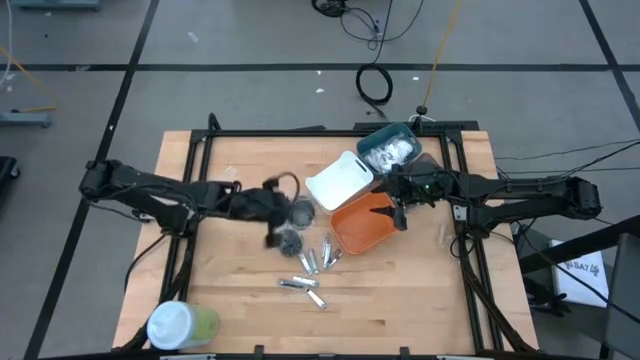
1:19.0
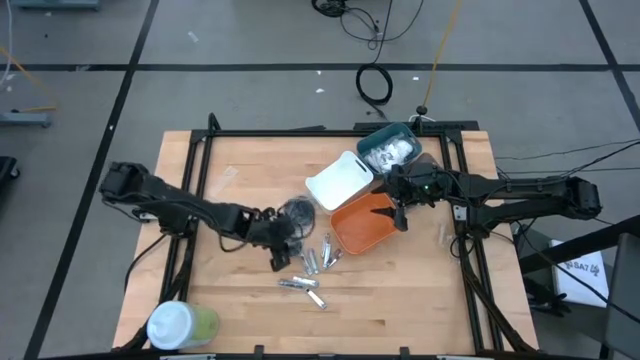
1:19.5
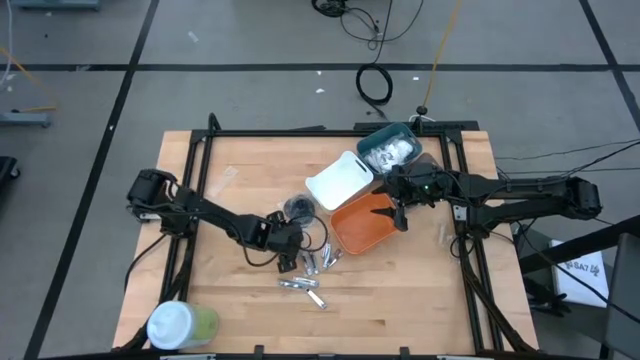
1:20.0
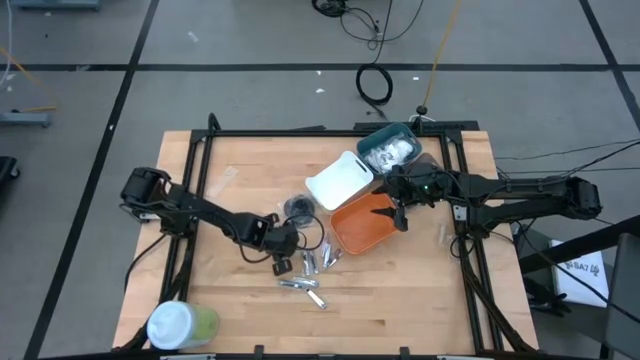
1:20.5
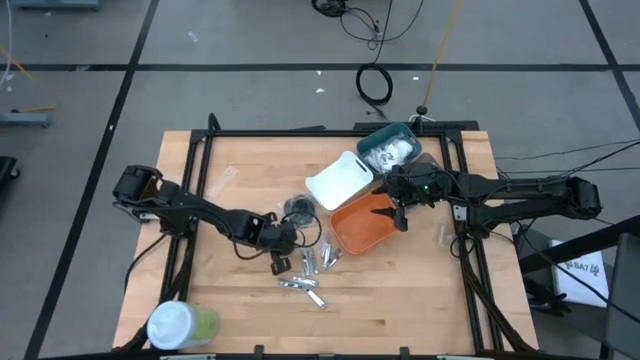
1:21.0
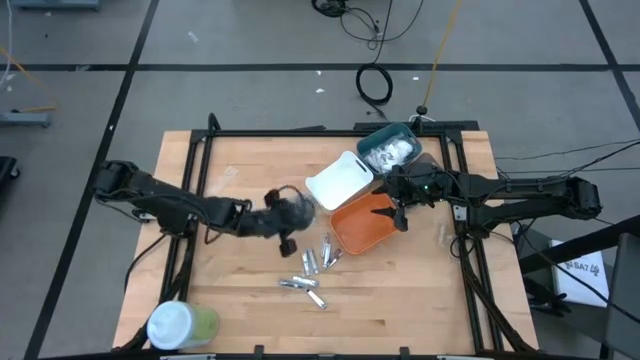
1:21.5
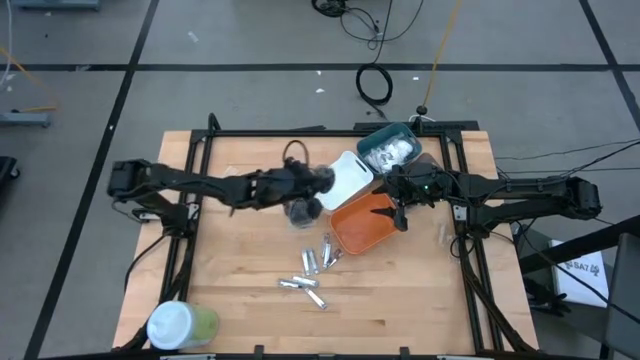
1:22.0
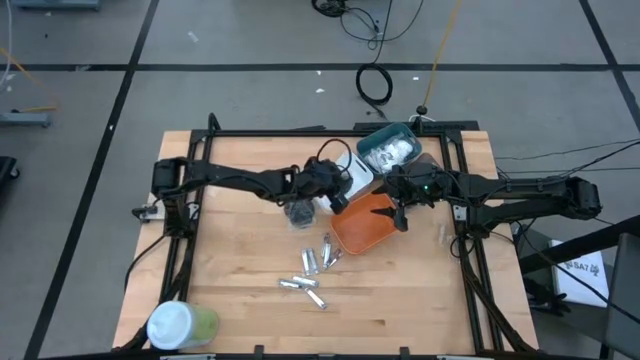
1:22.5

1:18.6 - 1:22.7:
Task: Pick & Place Travel size toiletries
Put the black hairbrush into the white bin

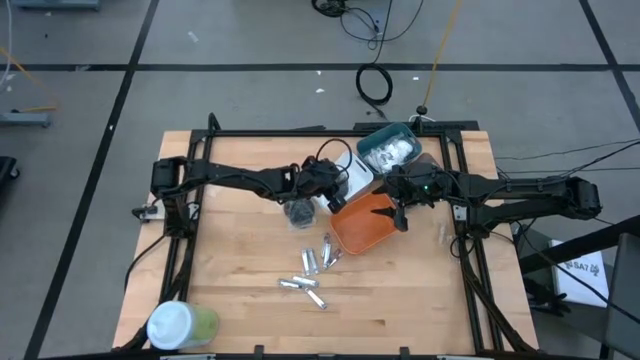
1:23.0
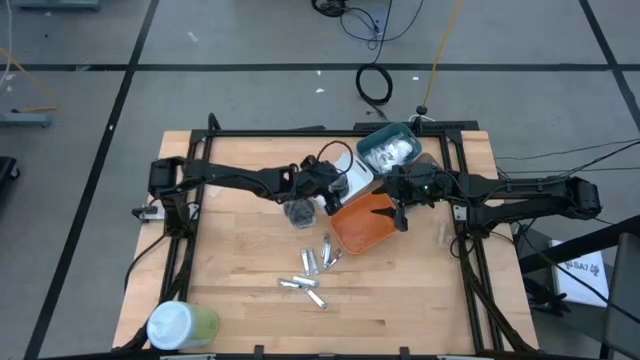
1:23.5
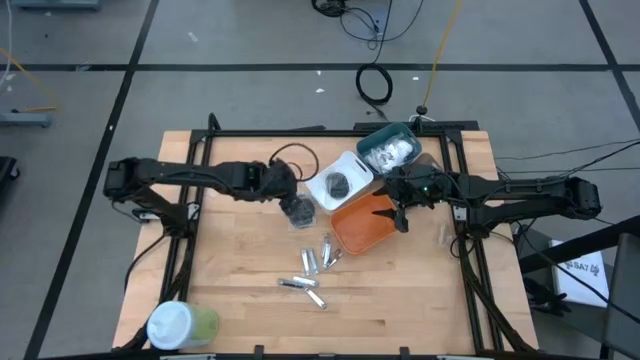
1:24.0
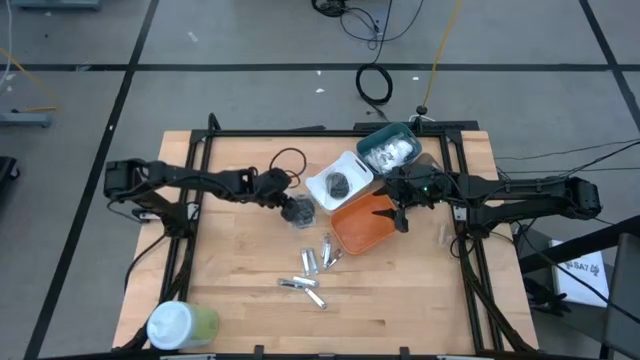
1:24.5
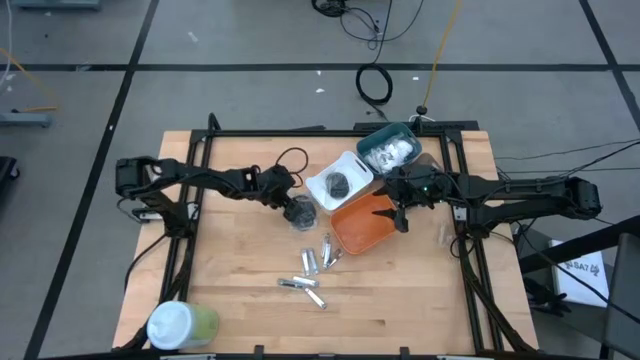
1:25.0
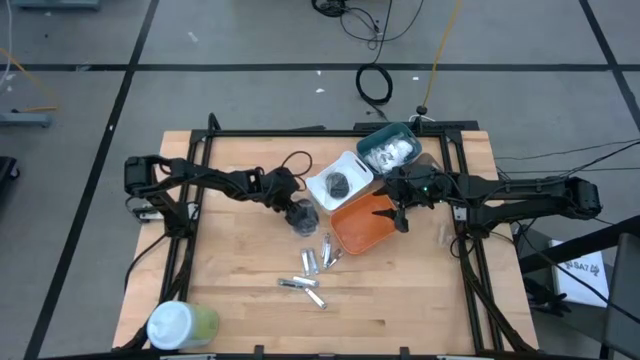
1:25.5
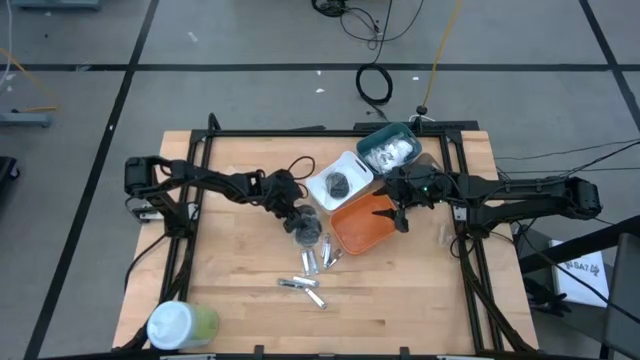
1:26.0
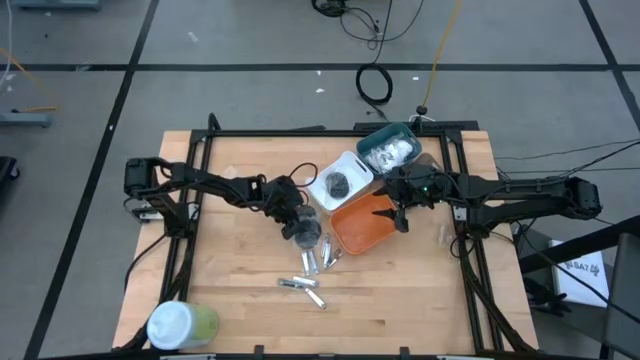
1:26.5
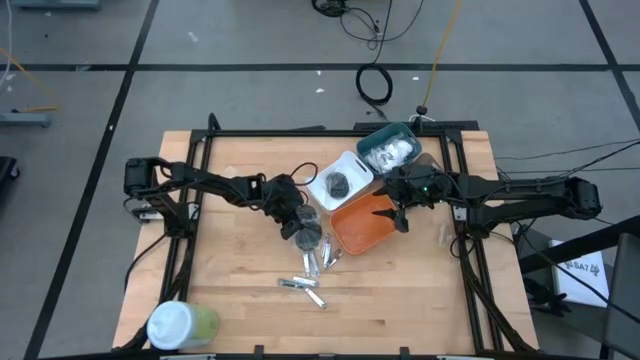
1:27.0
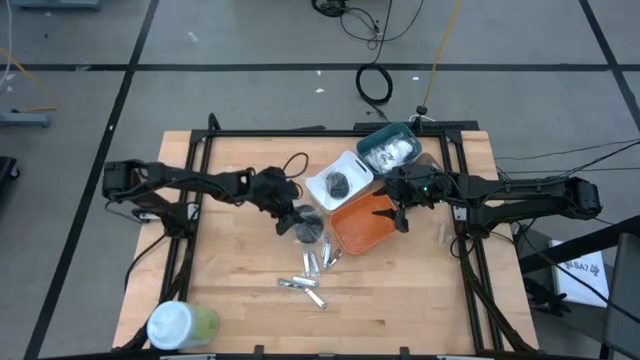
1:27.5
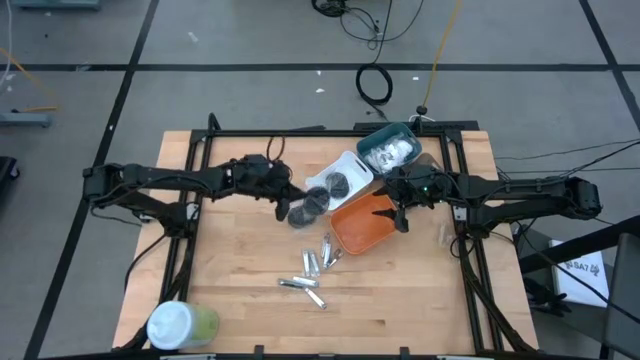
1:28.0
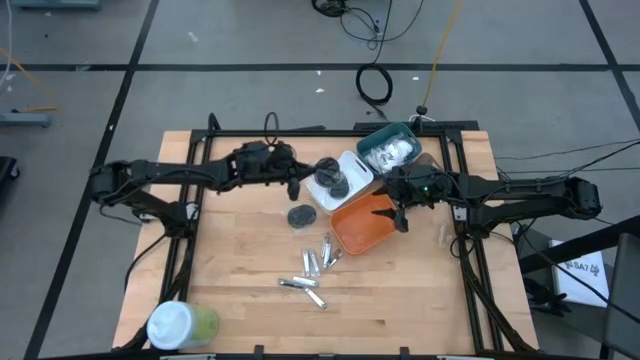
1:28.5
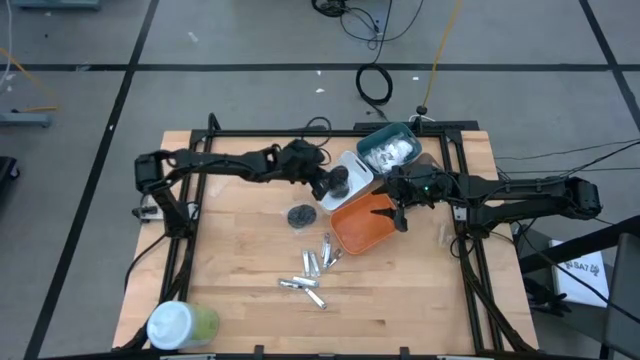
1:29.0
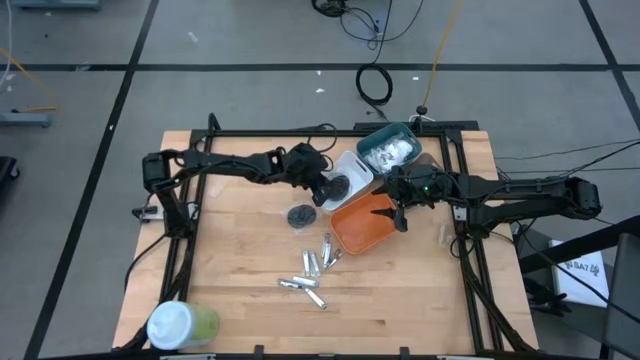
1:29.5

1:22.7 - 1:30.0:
Put the black hairbrush into the white bin

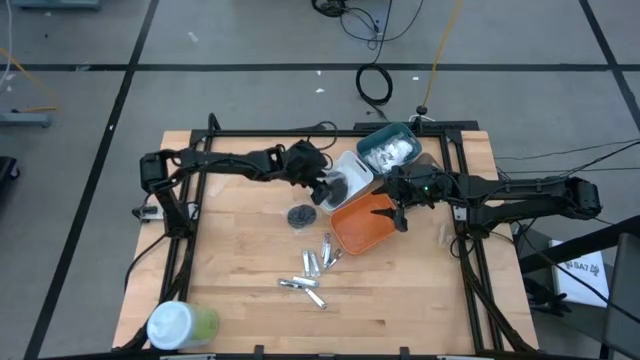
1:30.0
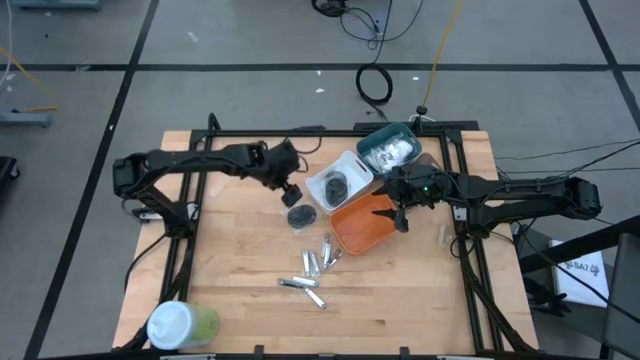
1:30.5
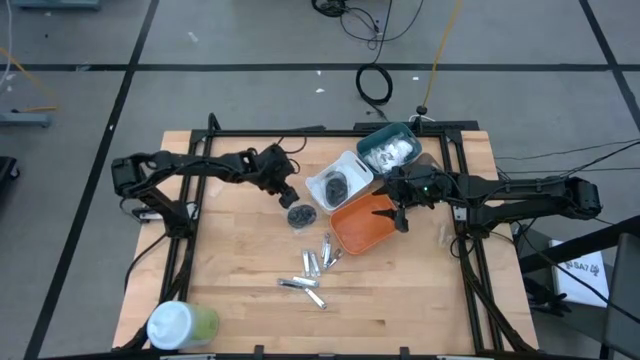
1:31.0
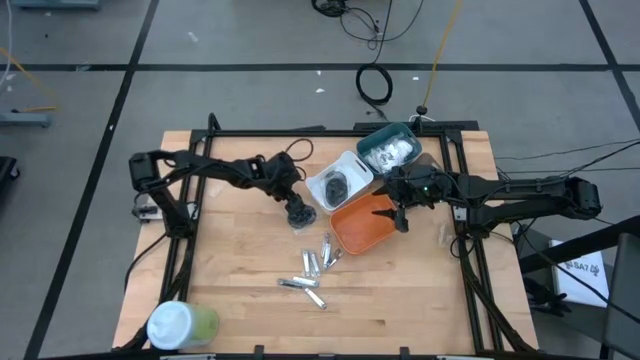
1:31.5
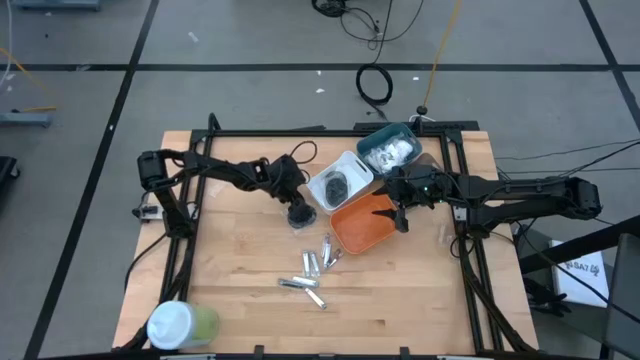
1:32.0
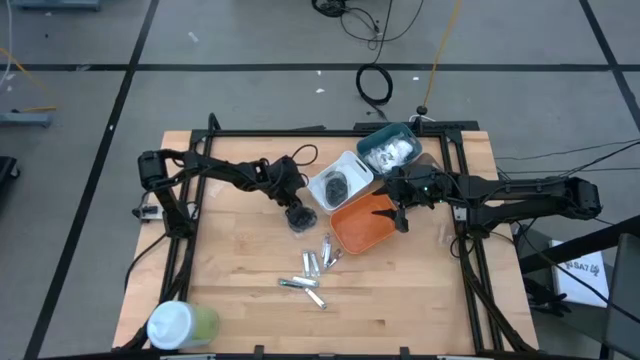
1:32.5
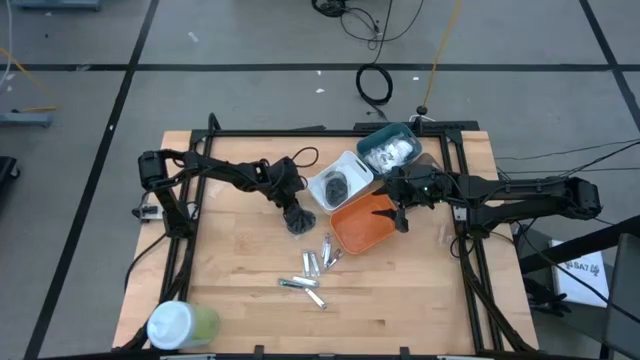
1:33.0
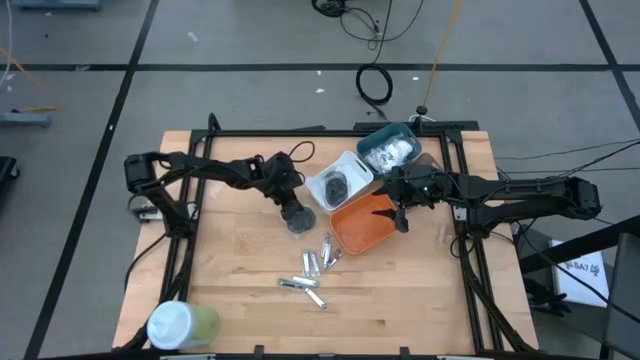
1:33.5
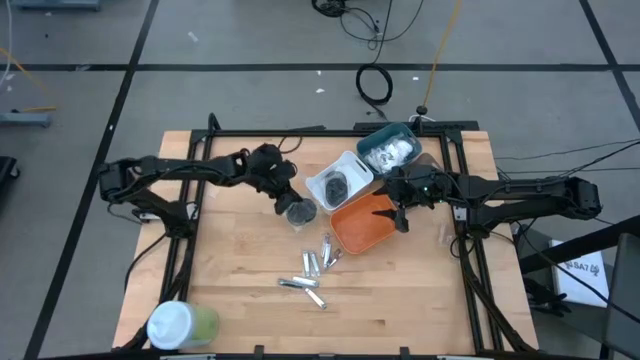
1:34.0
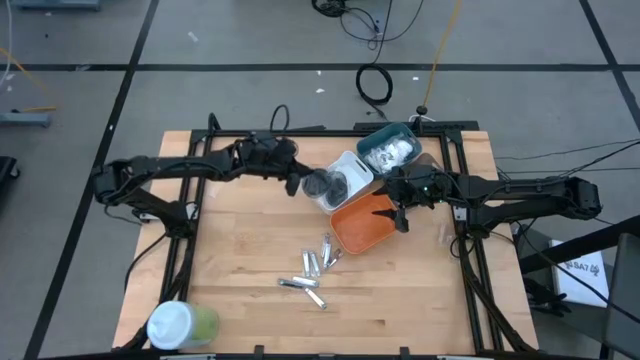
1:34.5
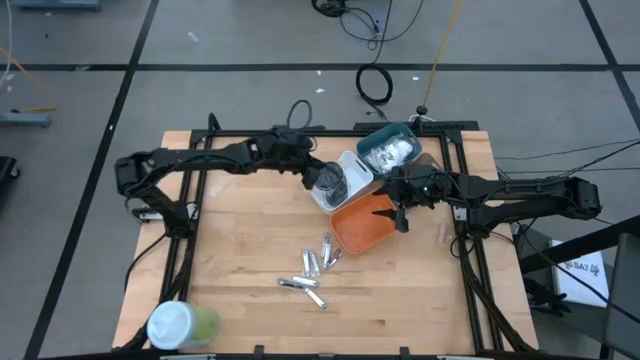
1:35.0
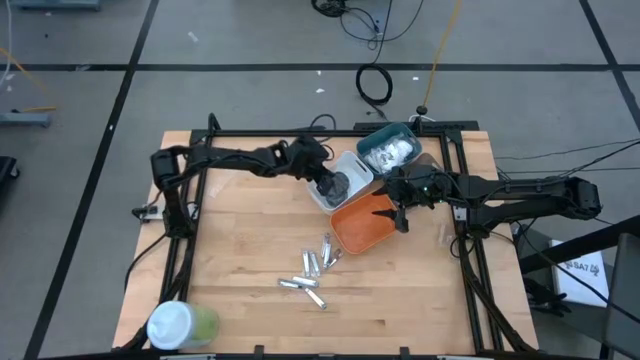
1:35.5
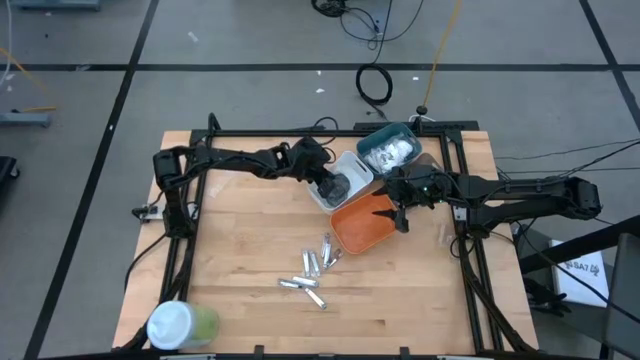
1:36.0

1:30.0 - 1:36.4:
Put the black hairbrush into the white bin

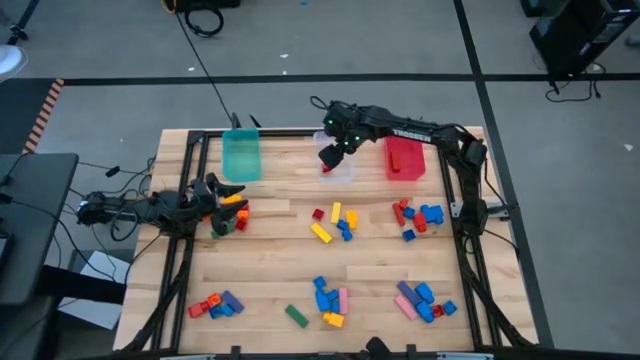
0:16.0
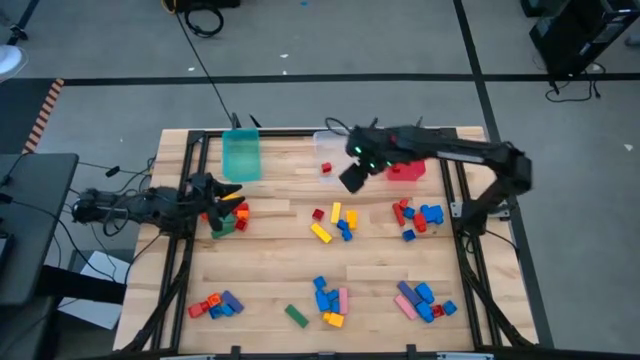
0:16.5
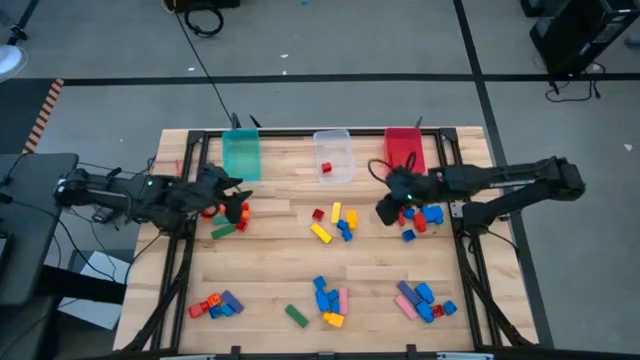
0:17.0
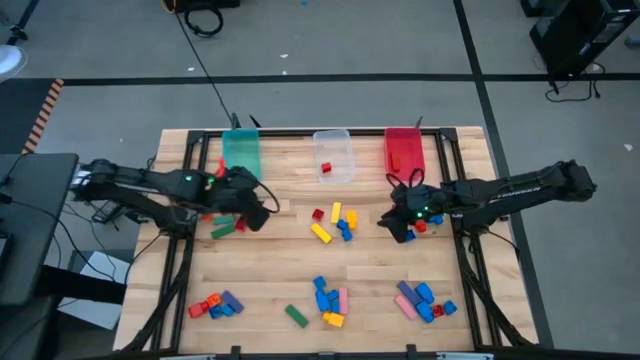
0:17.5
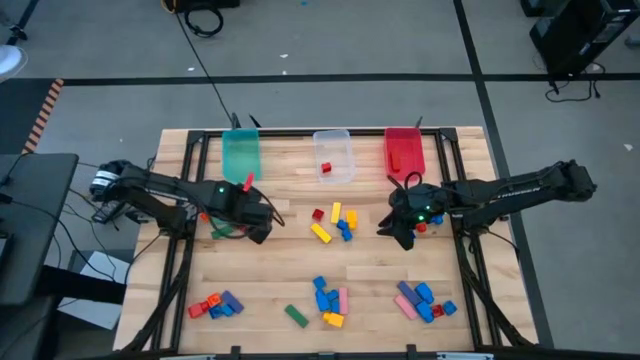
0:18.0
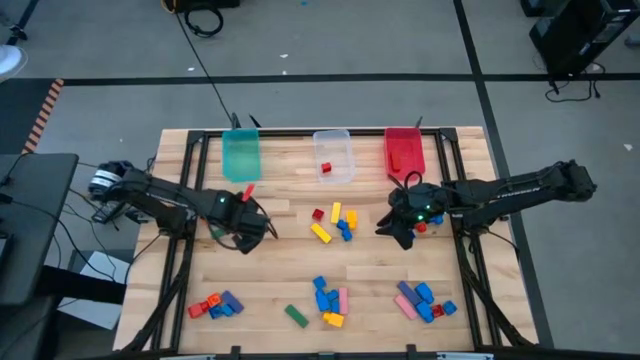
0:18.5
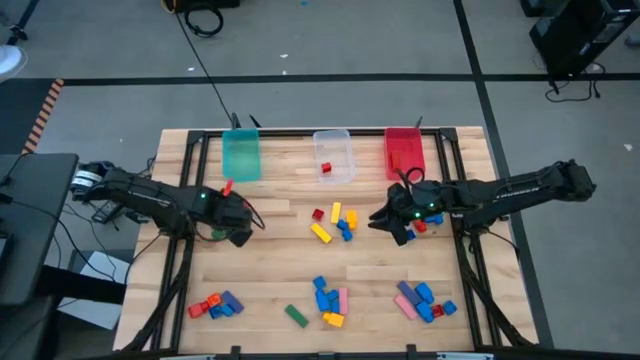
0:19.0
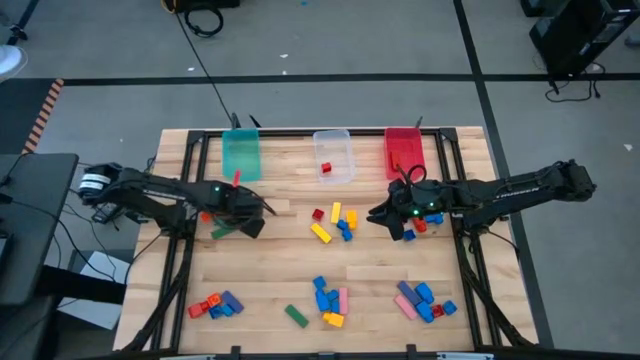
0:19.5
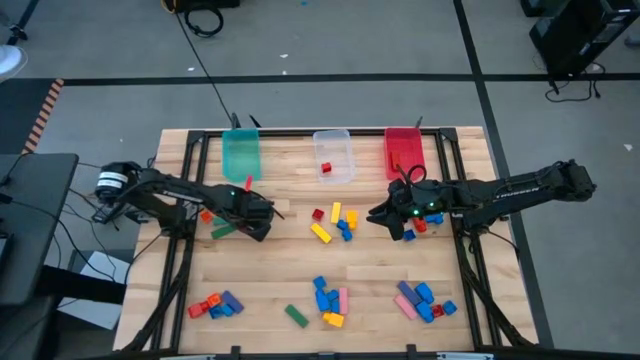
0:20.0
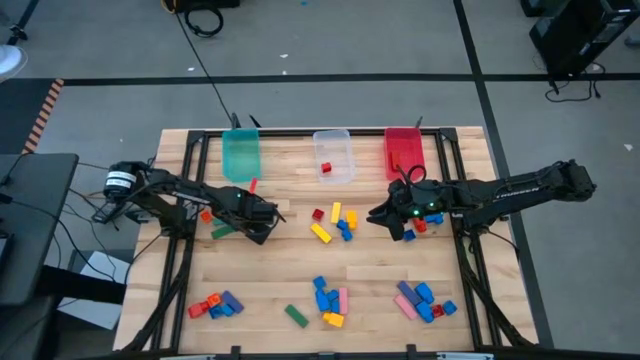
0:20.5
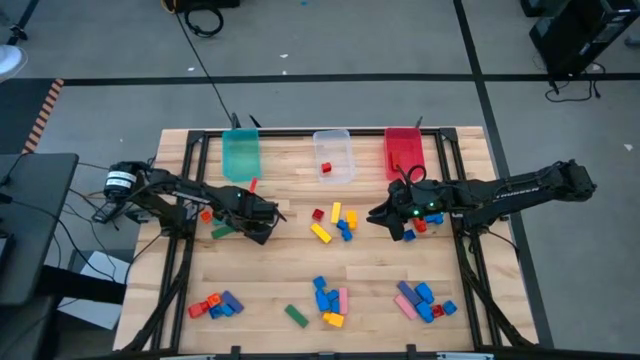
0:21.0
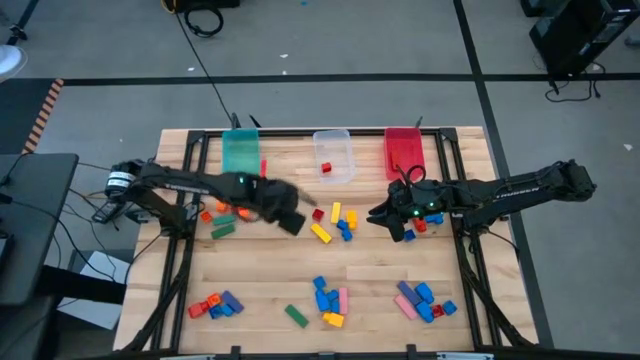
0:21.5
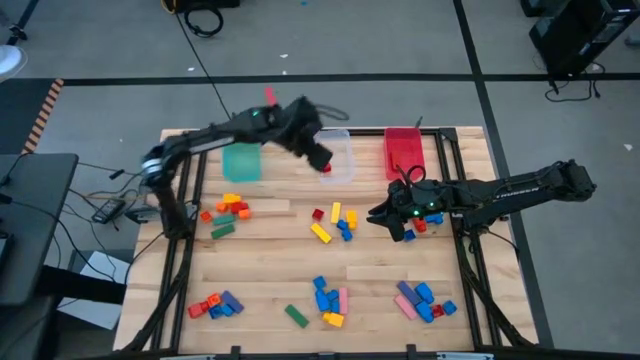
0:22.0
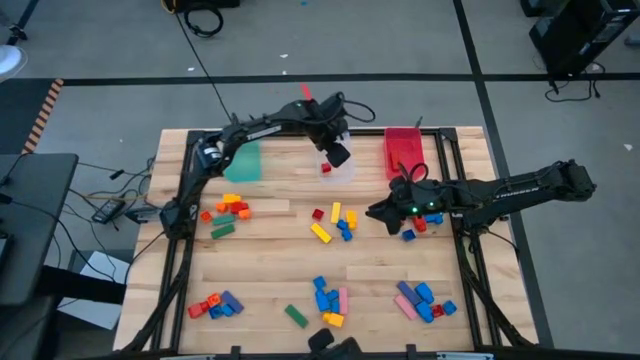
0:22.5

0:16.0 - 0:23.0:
Task: Sort blocks by size
Put the red 4 stud game piece into the transparent bin
